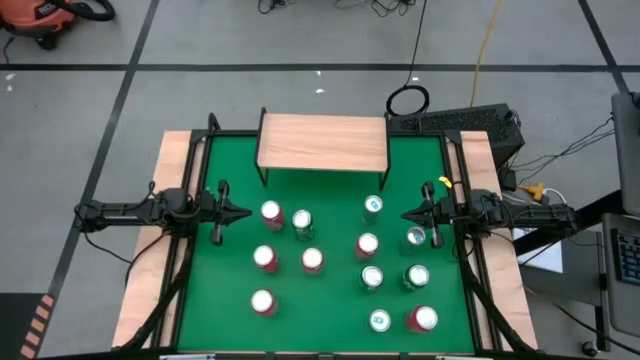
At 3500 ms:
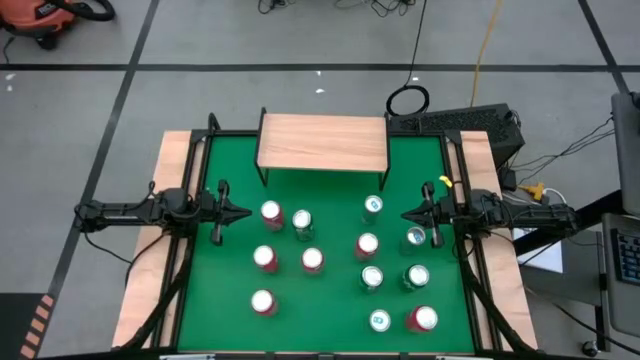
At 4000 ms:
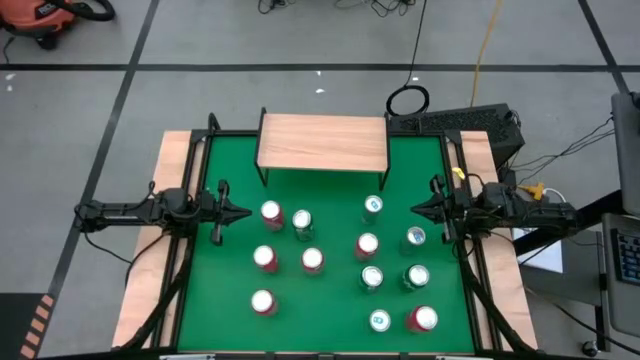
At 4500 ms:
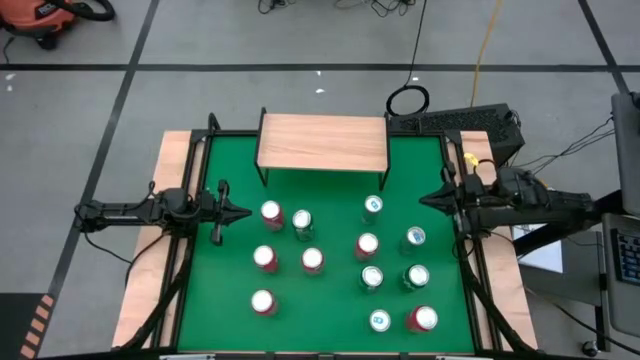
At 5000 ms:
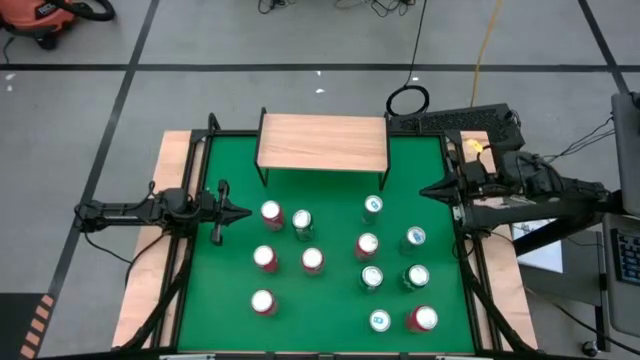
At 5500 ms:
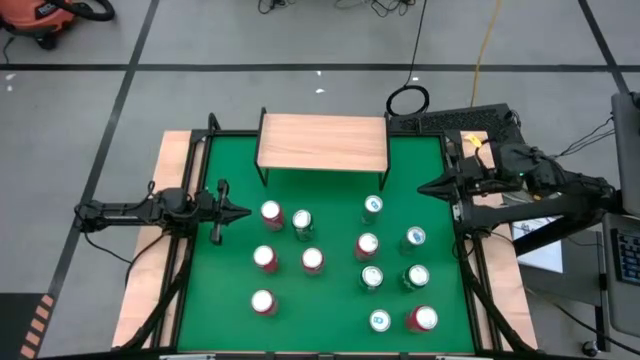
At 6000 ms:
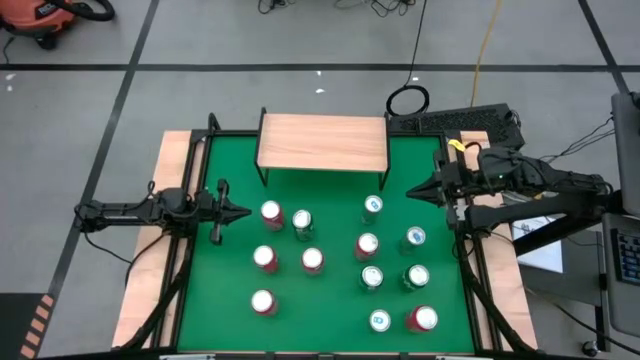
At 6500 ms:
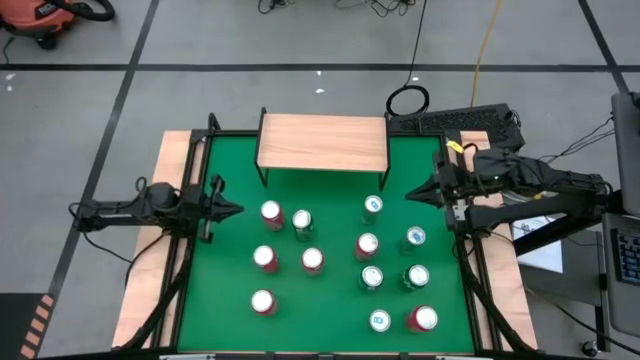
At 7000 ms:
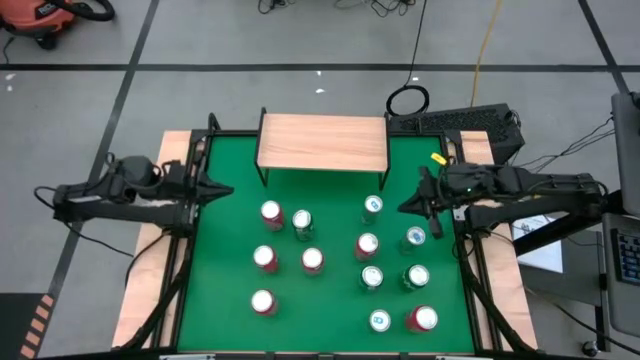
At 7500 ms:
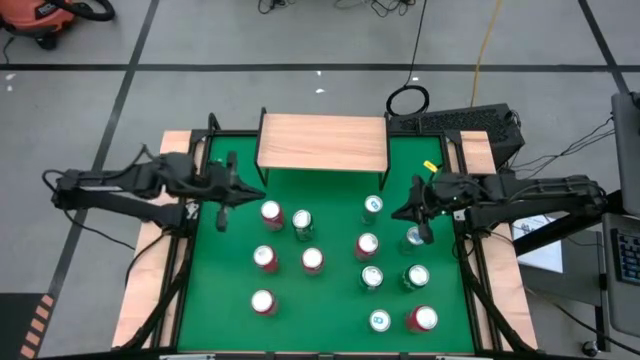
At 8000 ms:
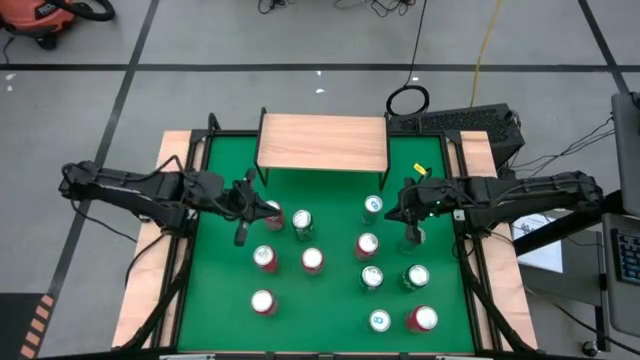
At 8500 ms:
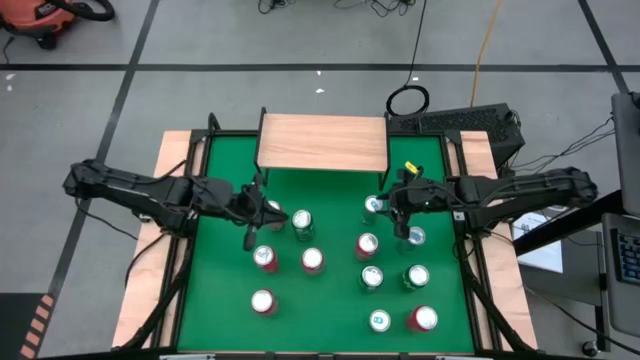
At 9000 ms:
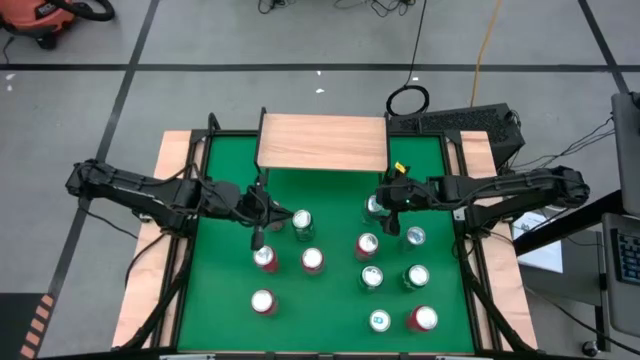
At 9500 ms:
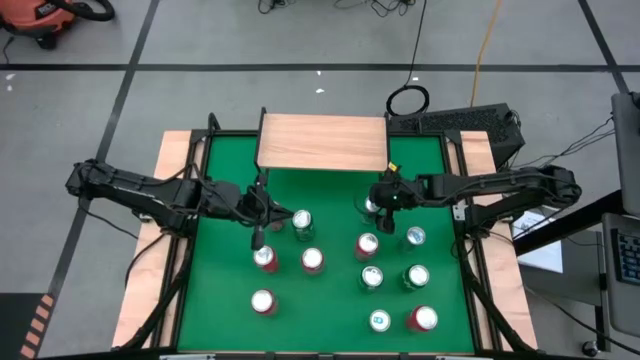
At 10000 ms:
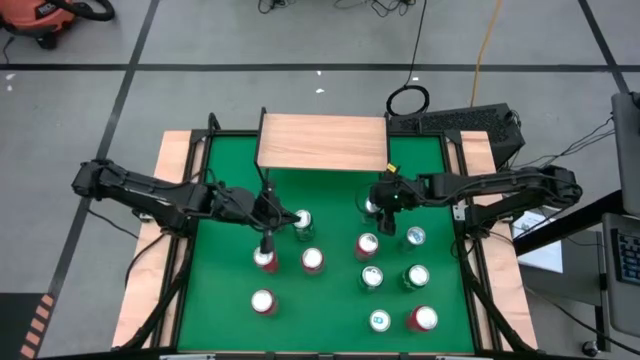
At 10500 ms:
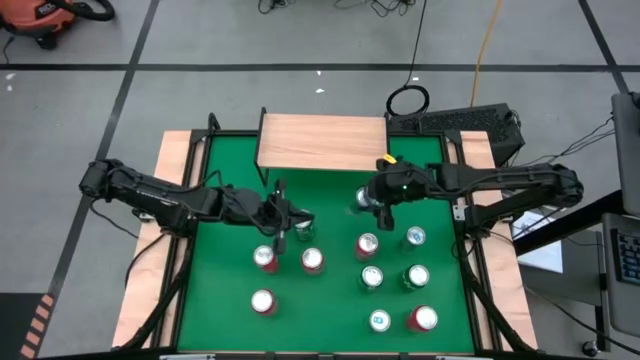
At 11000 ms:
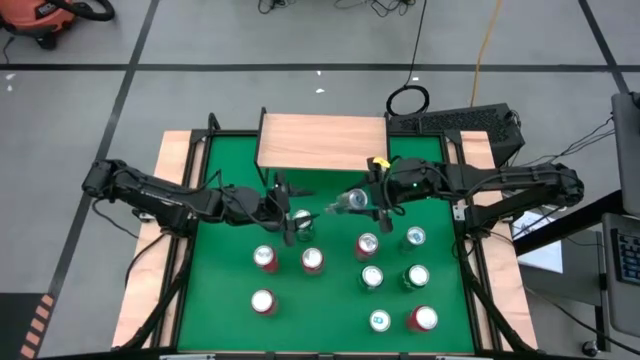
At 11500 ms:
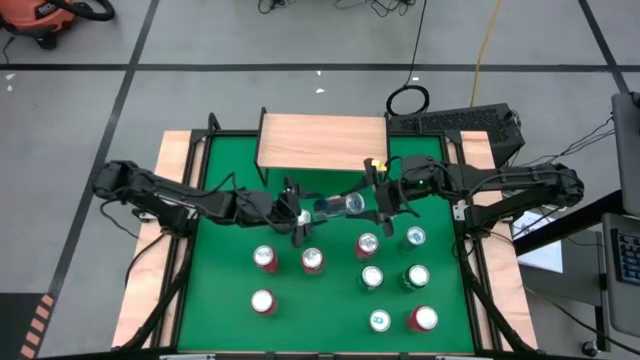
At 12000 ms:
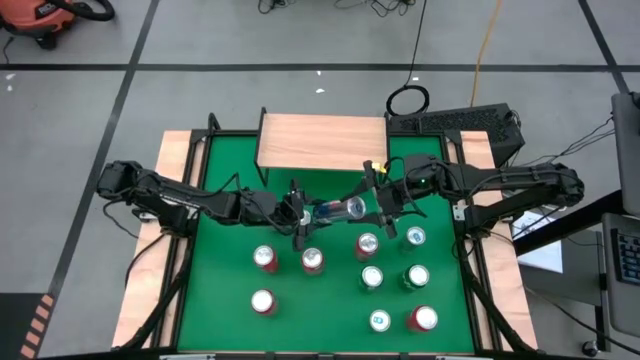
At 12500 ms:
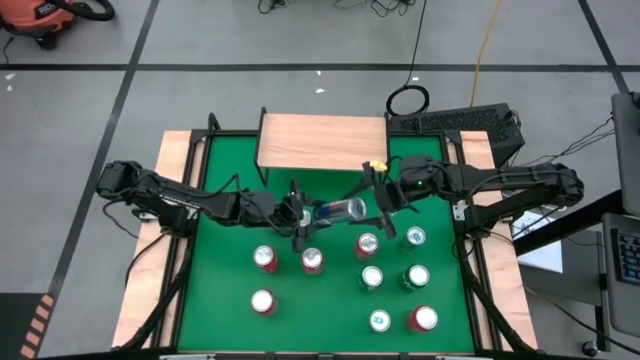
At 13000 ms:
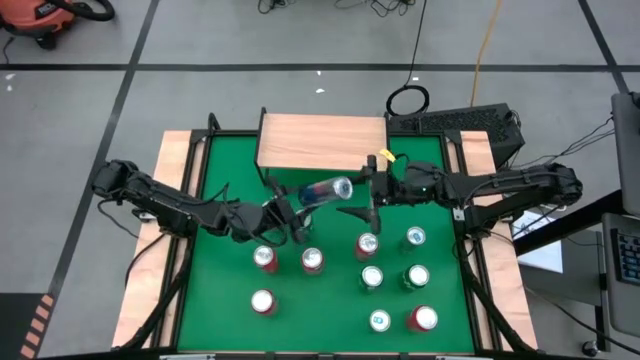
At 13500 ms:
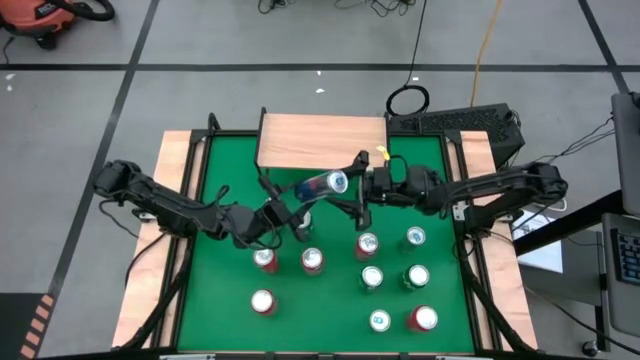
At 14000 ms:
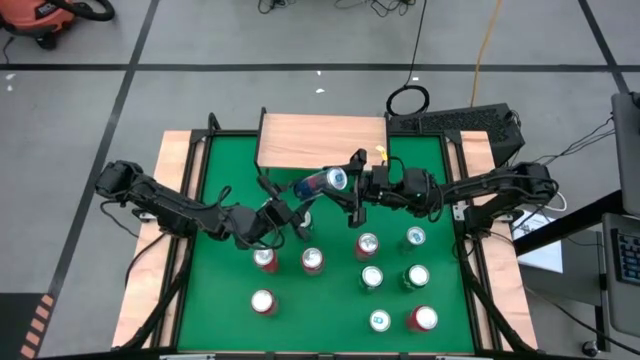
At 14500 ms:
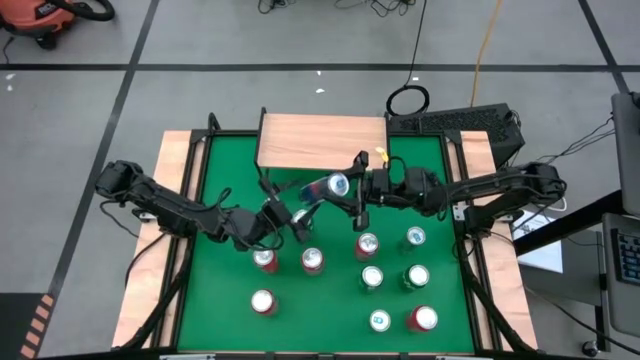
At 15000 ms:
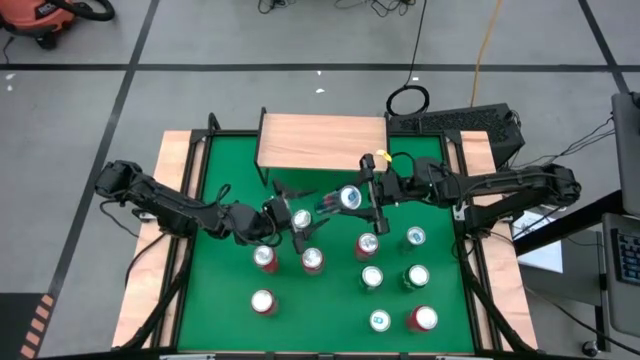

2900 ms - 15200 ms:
Task: Place canned beverage on shelf
Put the blue soda can on the shelf

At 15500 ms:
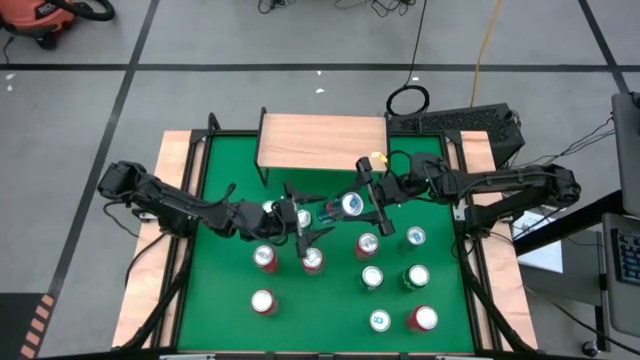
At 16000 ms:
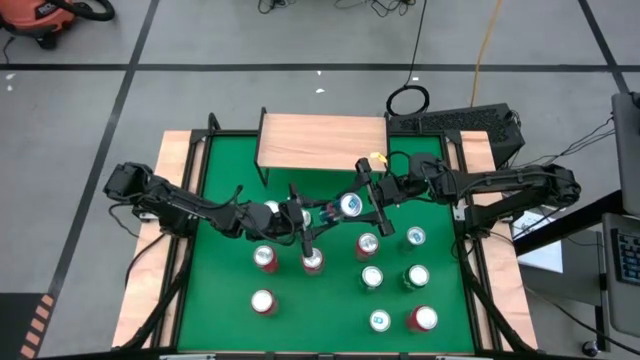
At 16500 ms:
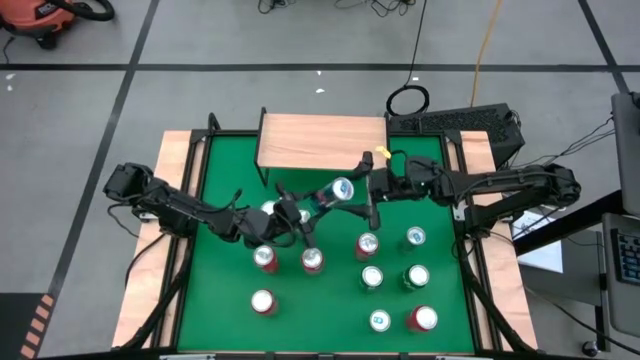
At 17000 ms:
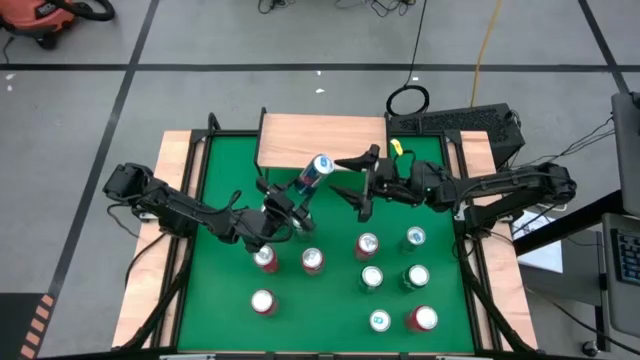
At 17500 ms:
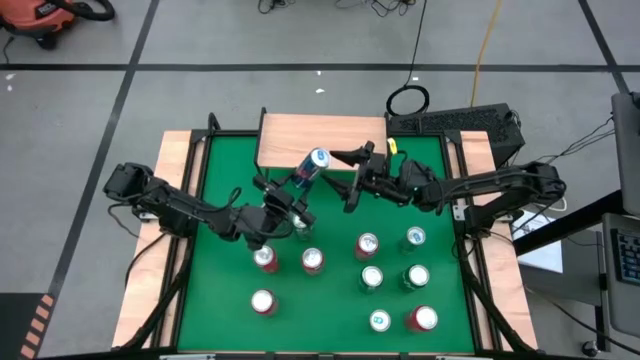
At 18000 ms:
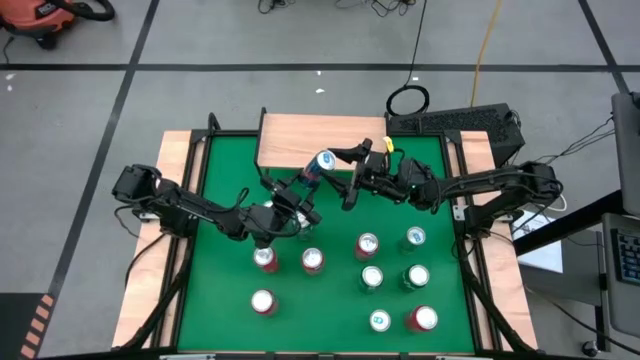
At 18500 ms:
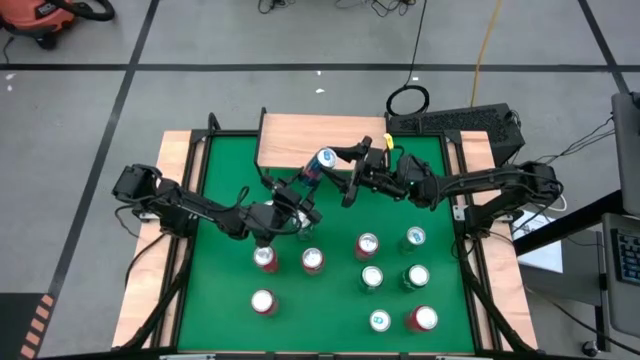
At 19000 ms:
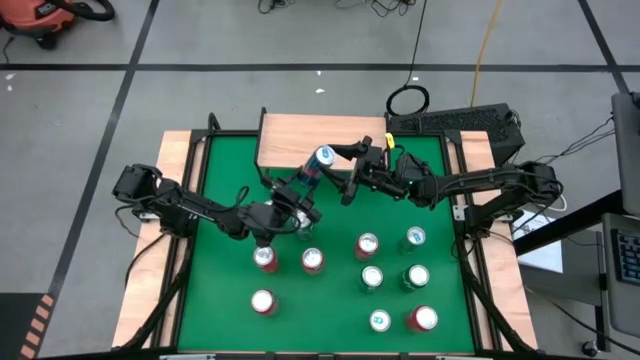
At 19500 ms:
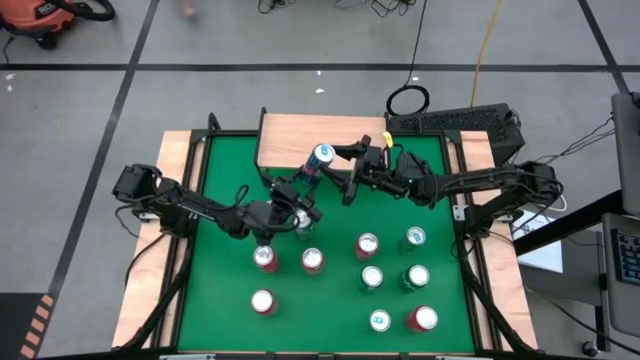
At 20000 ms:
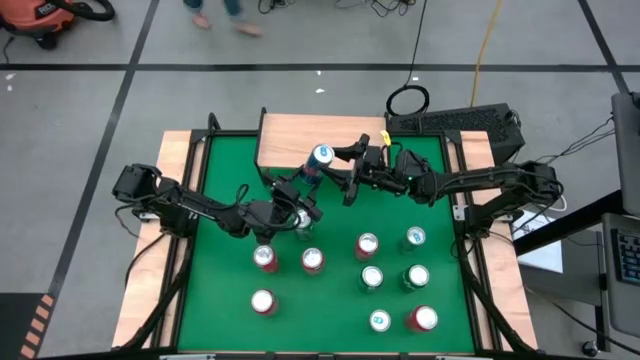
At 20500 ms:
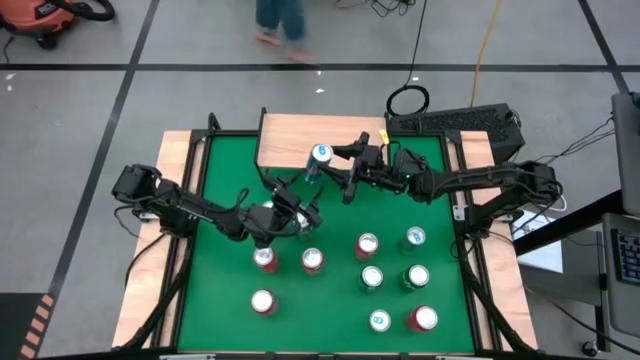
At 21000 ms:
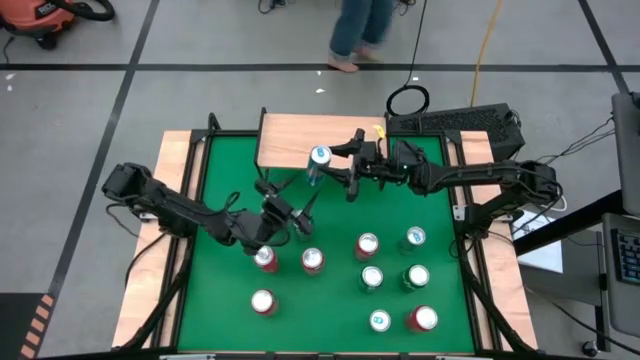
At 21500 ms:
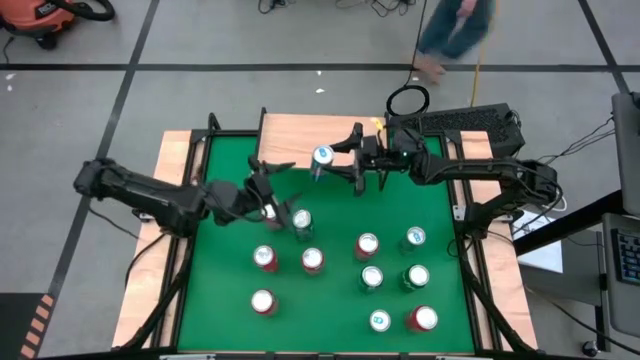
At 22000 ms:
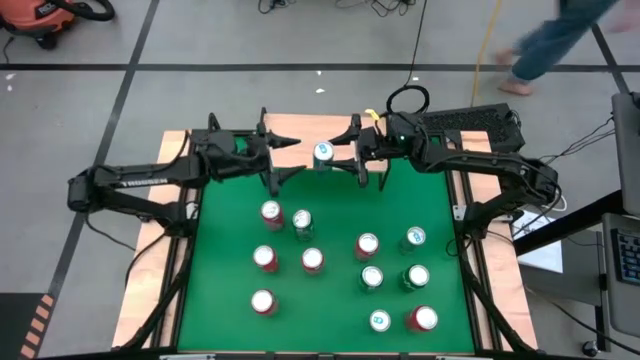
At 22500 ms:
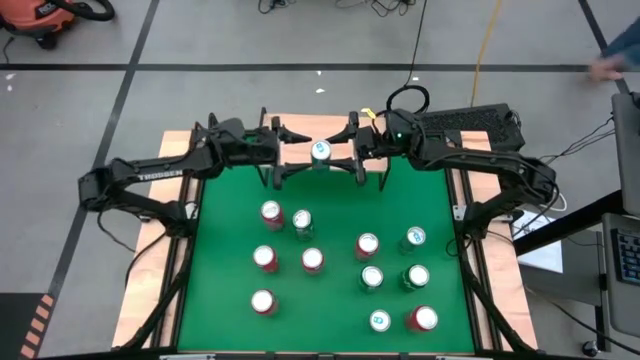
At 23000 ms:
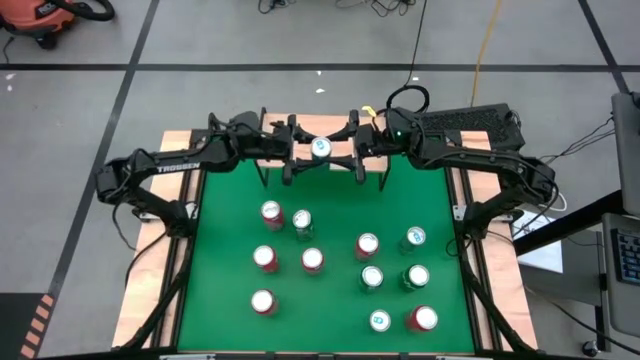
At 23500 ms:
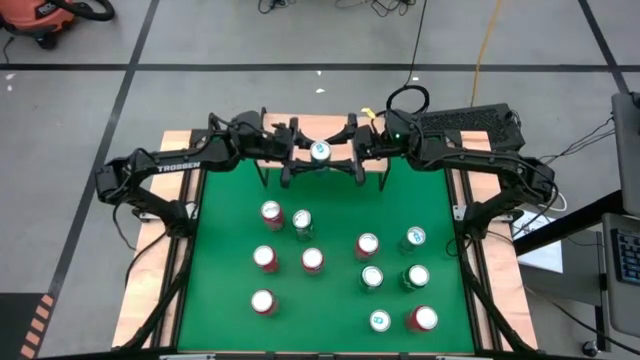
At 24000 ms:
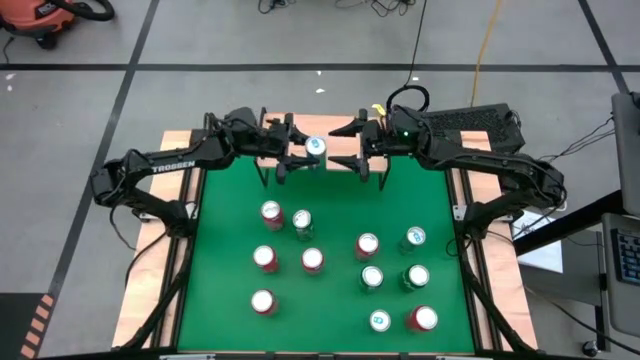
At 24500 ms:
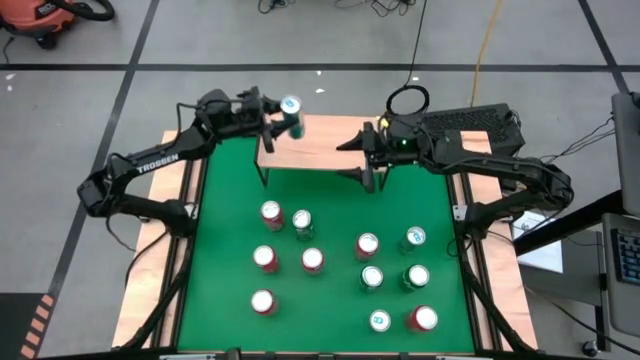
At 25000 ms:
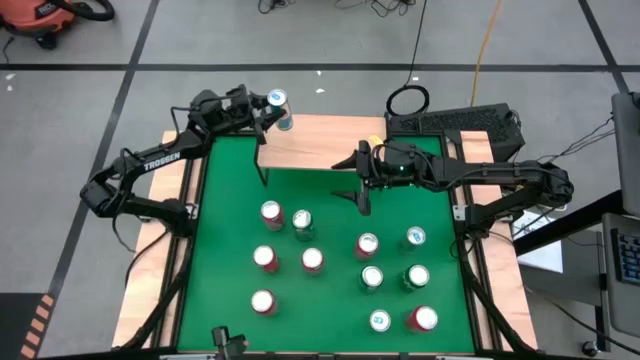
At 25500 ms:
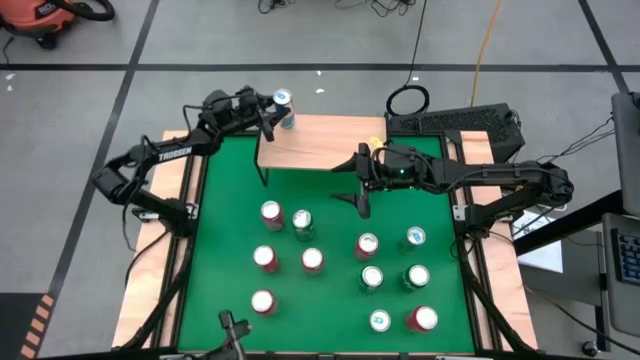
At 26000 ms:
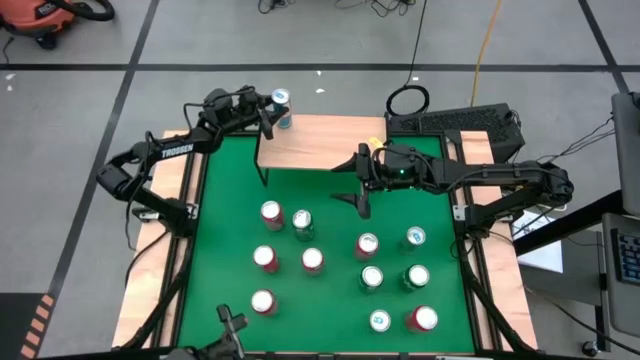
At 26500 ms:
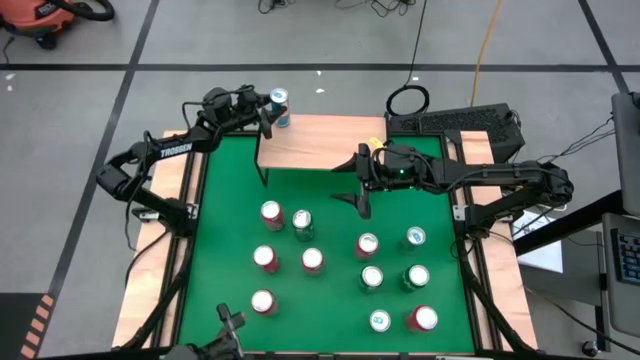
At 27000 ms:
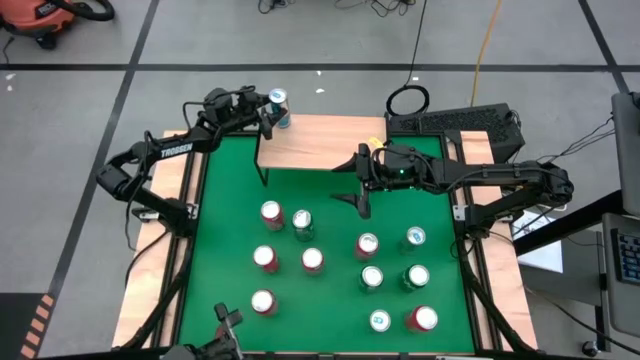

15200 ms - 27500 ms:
Put the blue soda can on the shelf
